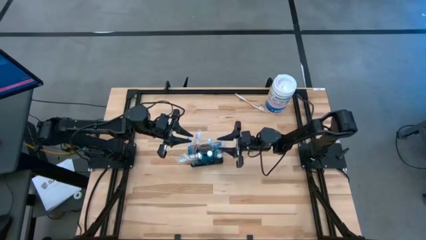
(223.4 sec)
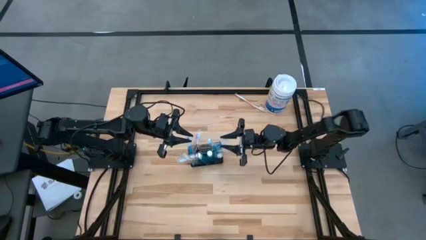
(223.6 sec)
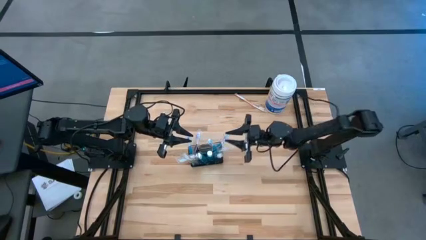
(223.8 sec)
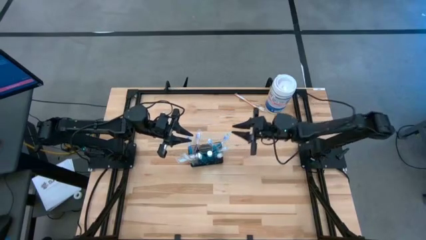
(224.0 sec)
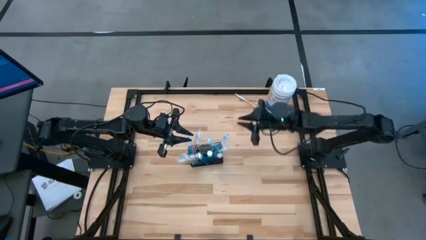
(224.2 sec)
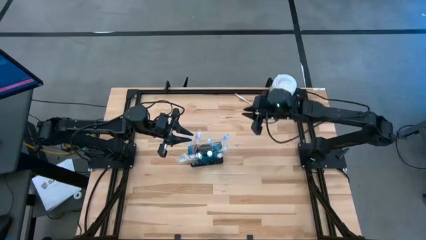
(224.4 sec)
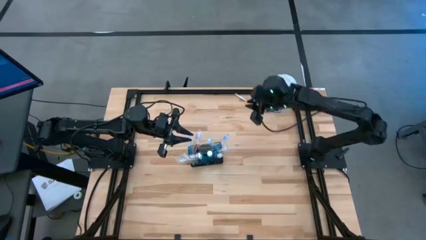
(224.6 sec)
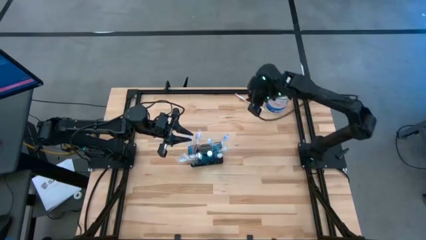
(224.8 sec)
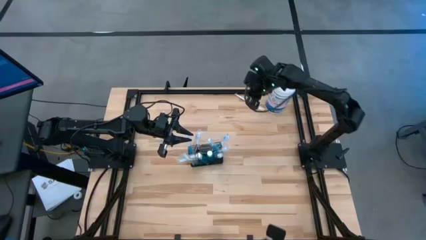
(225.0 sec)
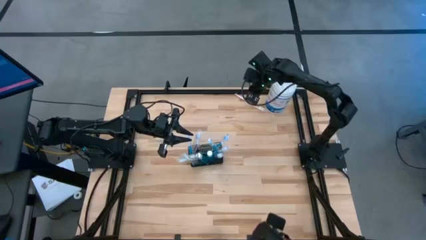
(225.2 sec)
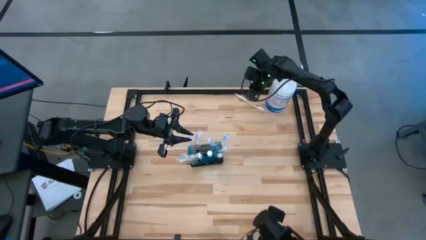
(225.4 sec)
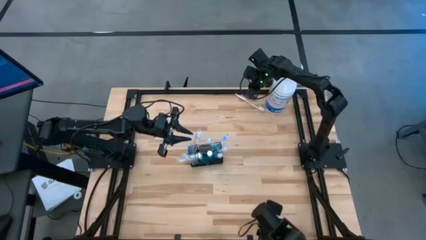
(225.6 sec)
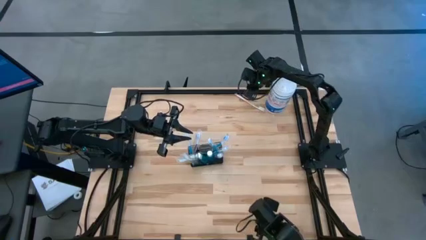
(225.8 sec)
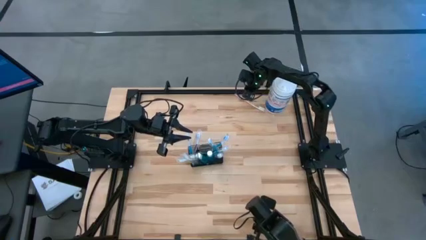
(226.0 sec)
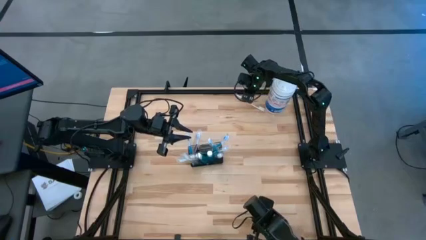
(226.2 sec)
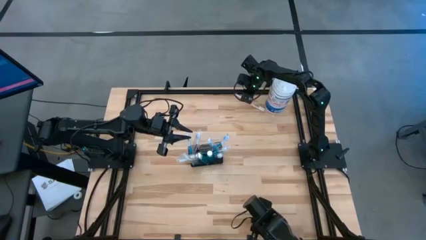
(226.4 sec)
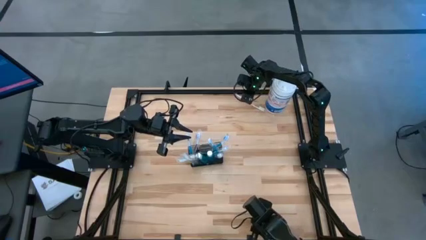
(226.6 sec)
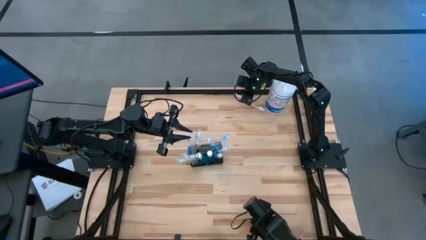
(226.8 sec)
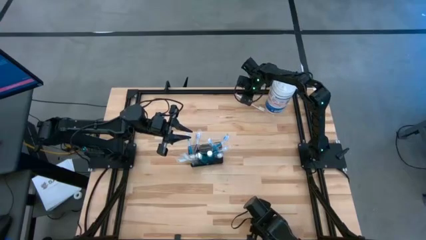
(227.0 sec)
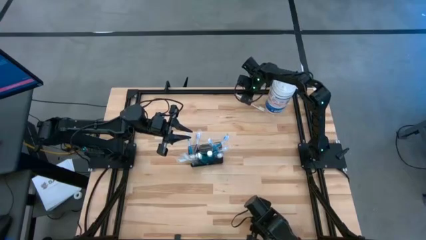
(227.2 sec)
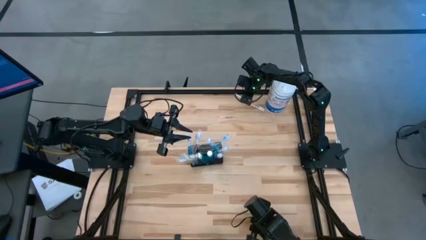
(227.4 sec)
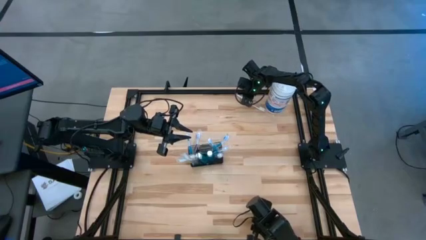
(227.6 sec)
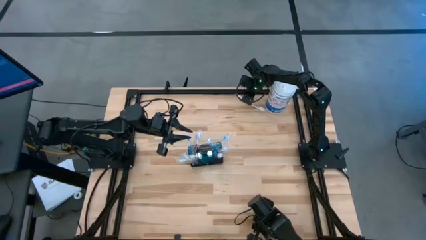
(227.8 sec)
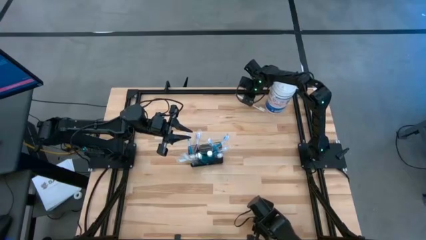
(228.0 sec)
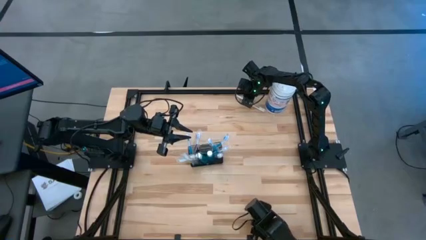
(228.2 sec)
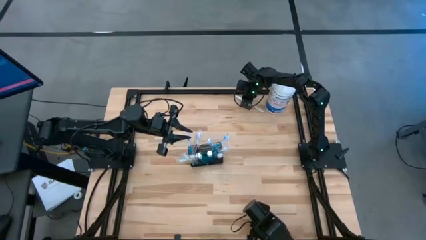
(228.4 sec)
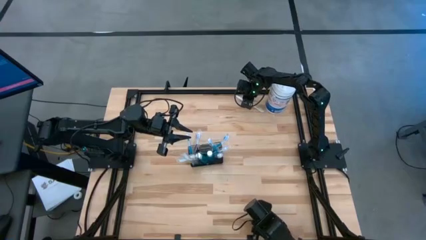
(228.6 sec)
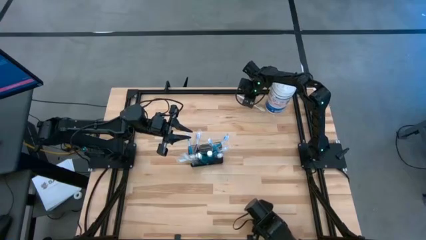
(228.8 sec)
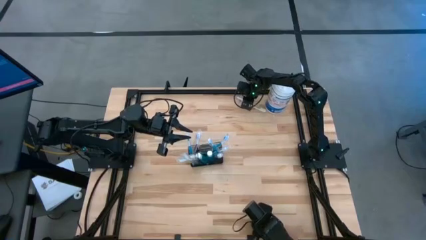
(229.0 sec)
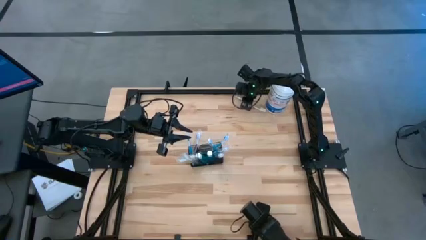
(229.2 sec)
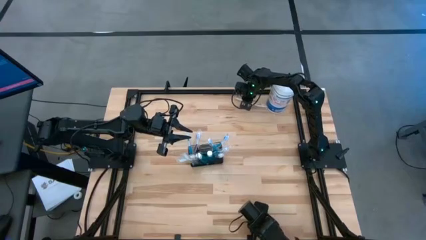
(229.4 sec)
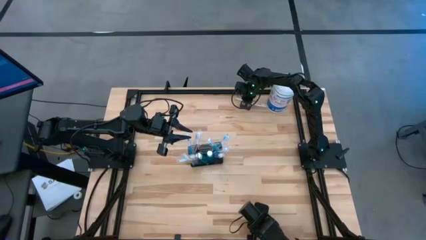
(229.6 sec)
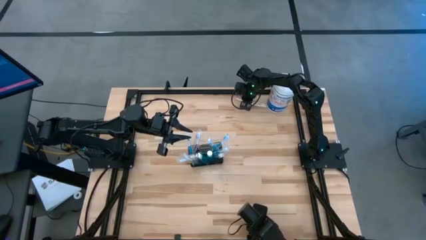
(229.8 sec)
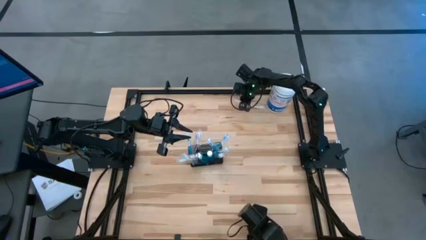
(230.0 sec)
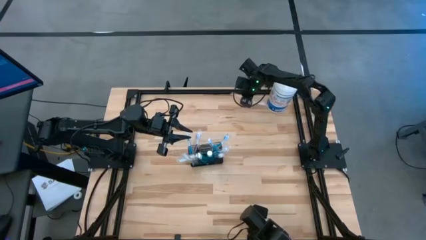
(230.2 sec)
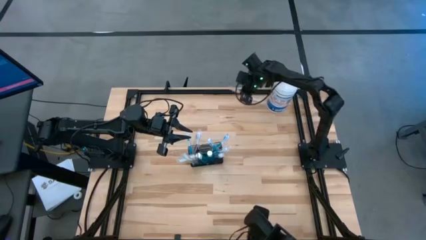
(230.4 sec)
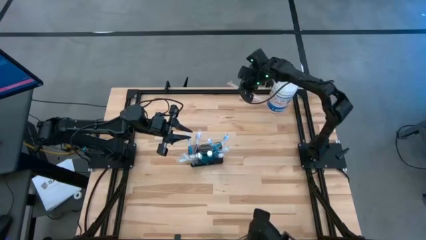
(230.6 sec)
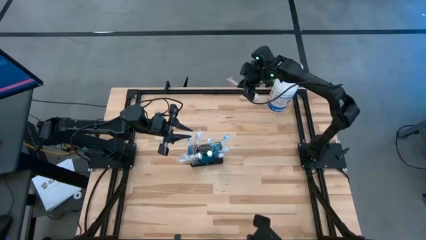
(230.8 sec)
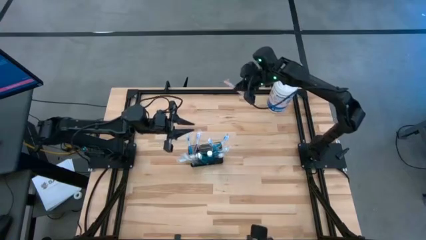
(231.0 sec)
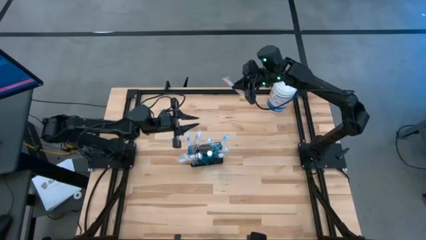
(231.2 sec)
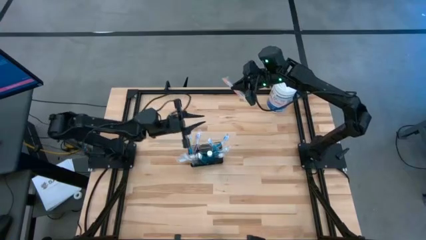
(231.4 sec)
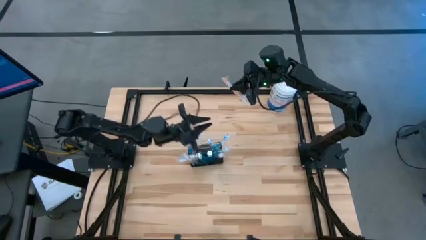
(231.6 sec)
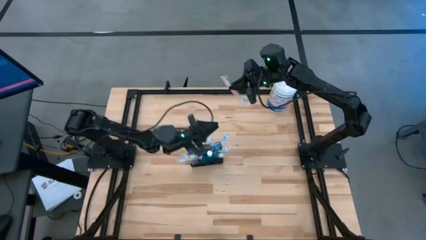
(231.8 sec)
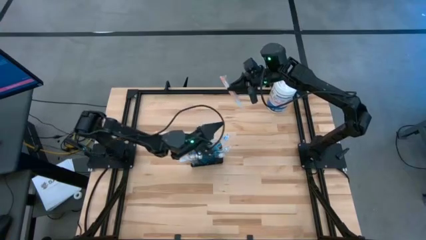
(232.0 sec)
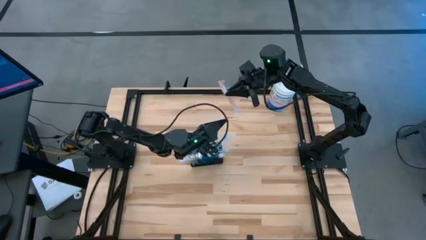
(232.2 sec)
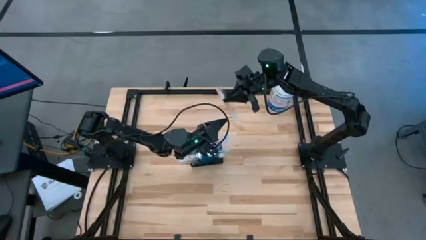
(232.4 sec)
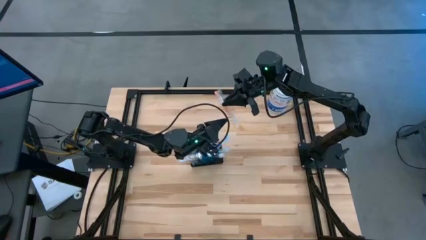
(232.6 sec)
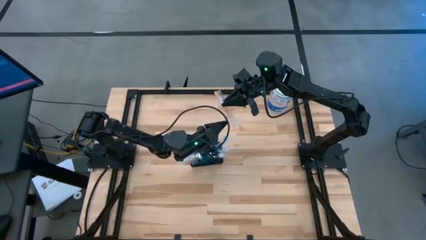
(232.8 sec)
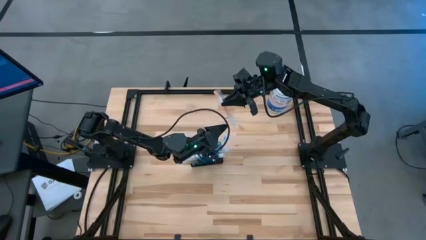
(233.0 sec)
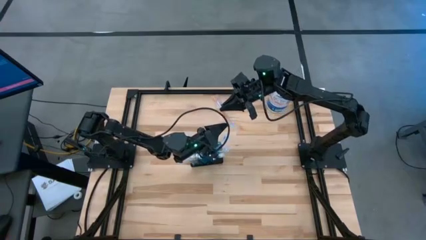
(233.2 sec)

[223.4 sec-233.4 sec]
Task: Pick & Place toothbrushing station
Put the orange toothbrush into the wire organizer

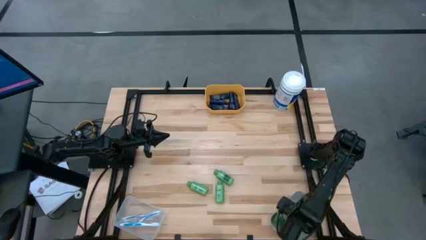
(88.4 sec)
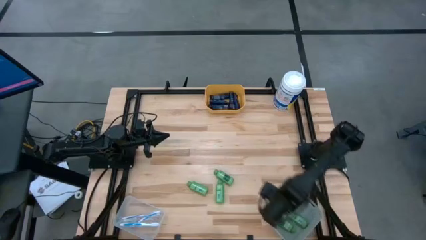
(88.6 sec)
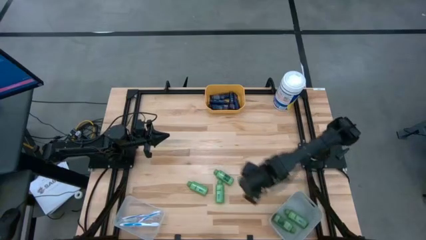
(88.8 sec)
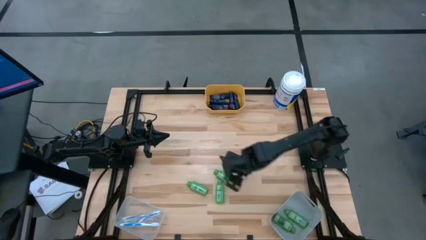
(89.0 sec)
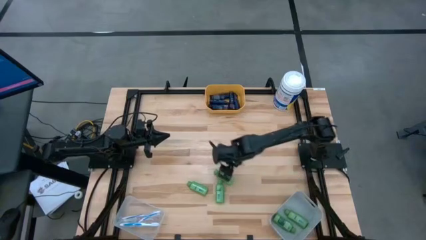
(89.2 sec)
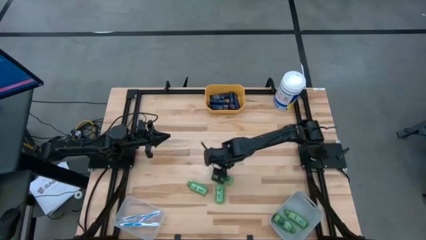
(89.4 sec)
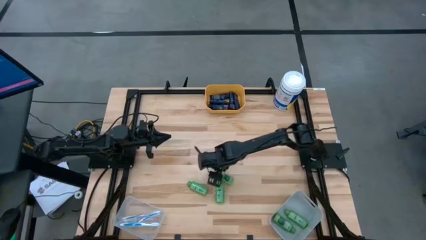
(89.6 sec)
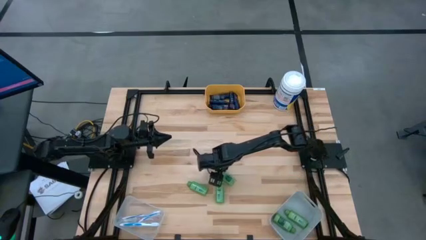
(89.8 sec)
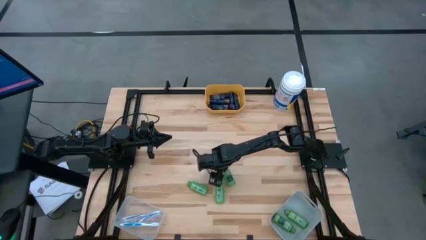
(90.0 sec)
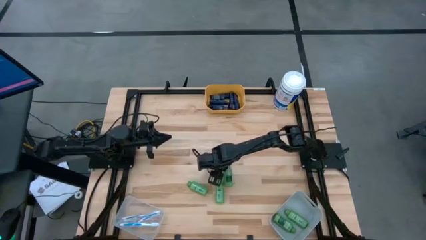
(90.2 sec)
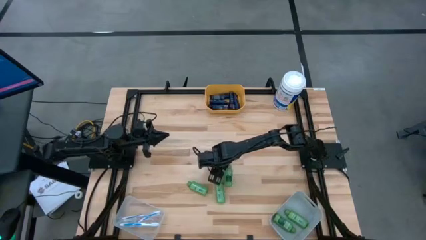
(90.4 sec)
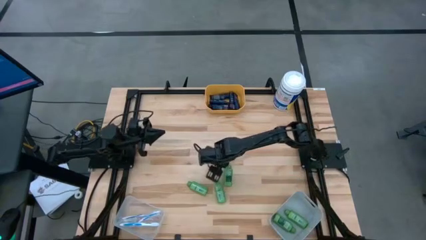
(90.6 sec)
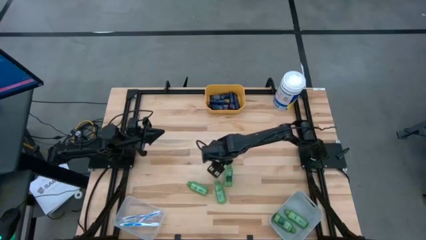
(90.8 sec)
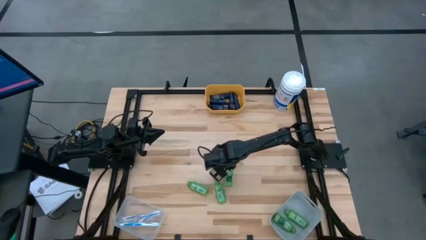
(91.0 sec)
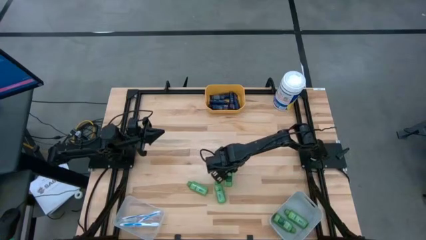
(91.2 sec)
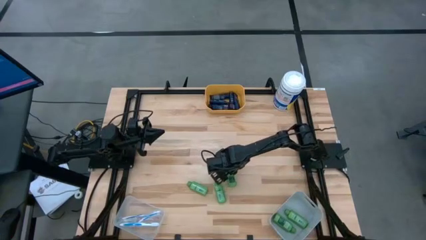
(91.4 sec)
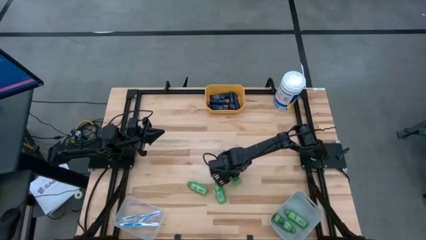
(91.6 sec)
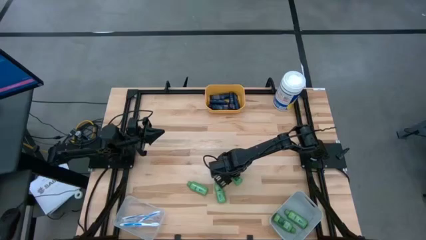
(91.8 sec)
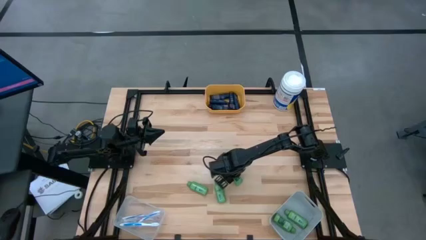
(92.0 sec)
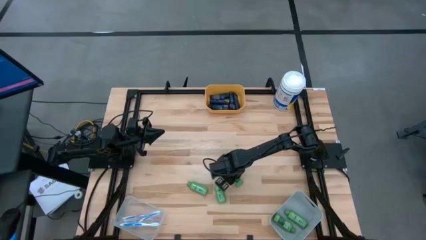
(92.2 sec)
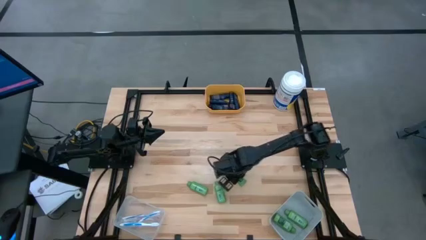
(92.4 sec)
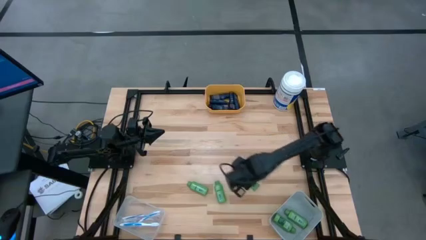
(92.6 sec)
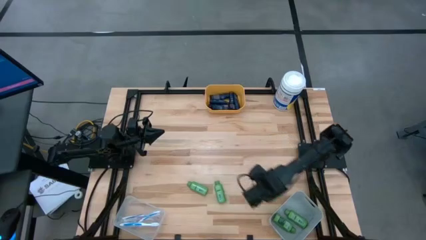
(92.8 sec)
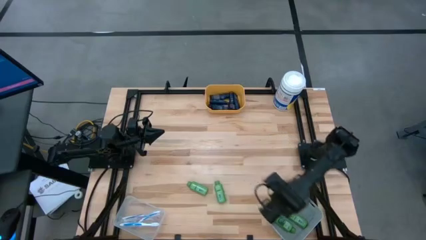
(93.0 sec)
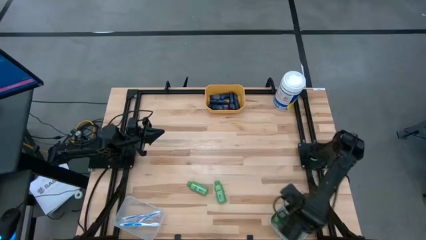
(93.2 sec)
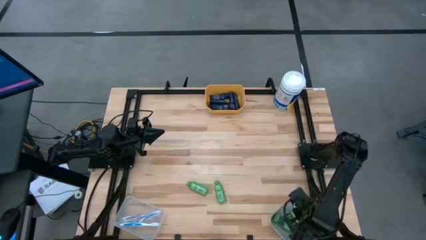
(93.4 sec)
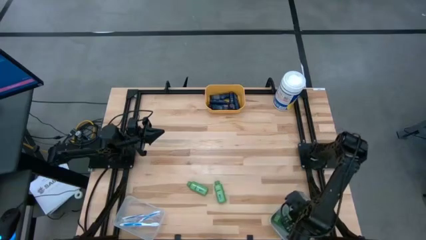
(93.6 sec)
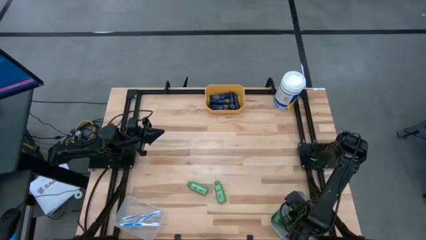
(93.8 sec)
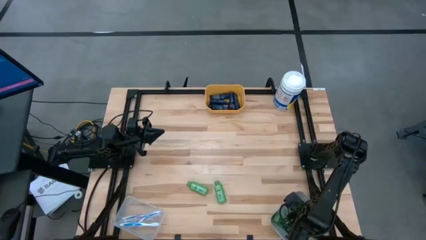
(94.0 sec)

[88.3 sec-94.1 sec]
Task: Pick & Place Travel size toiletries
Put the shampoo into the white bin
